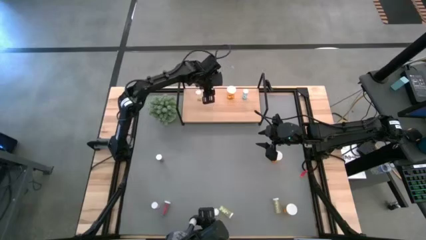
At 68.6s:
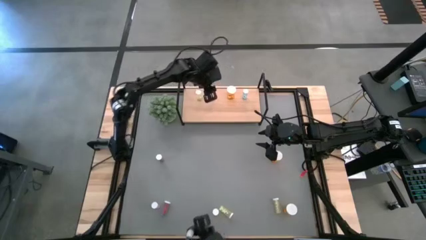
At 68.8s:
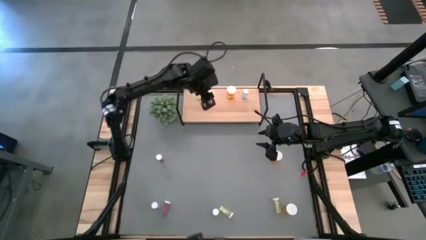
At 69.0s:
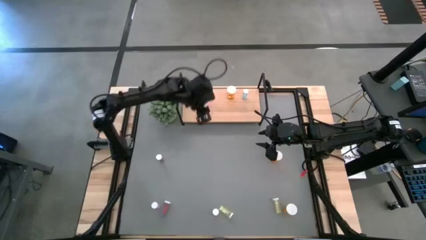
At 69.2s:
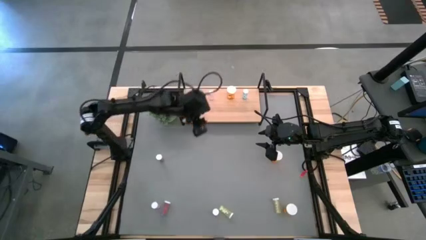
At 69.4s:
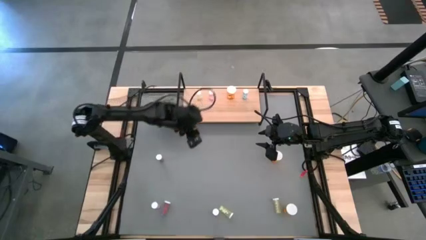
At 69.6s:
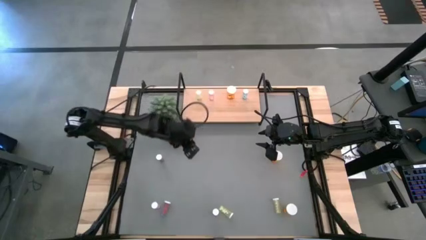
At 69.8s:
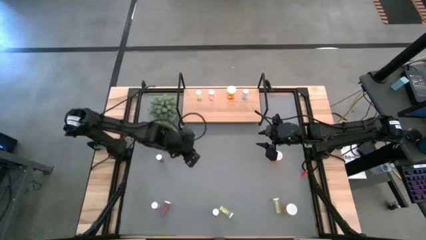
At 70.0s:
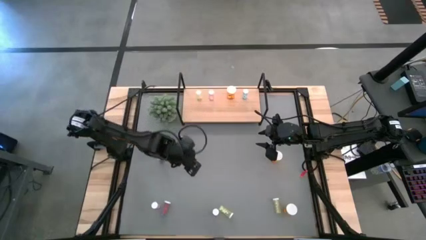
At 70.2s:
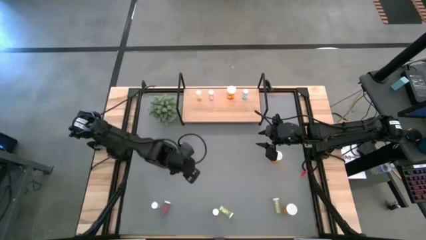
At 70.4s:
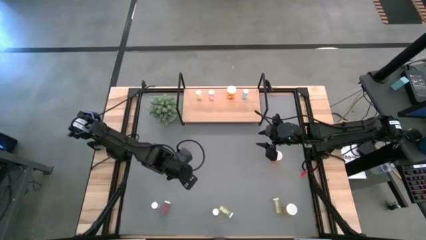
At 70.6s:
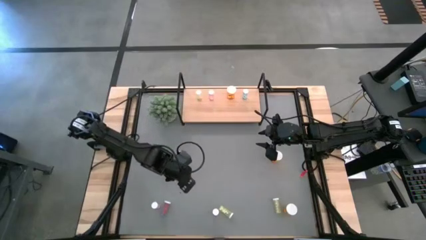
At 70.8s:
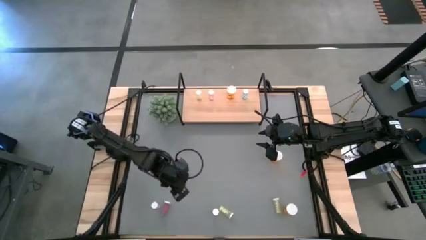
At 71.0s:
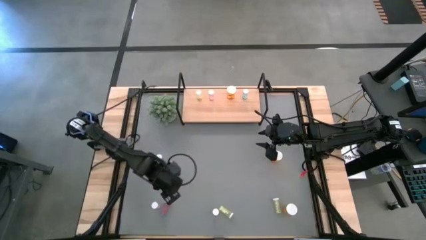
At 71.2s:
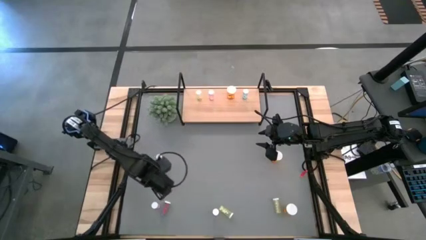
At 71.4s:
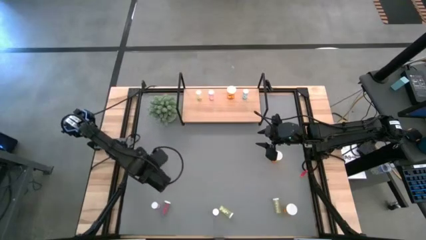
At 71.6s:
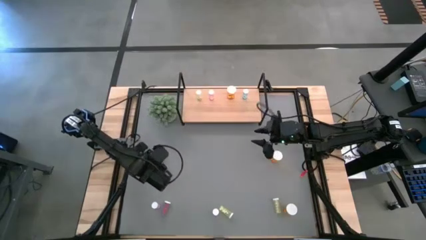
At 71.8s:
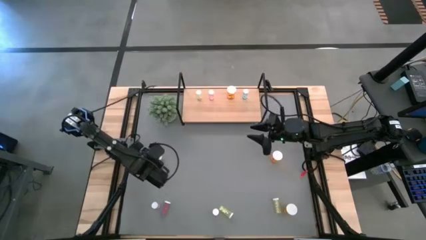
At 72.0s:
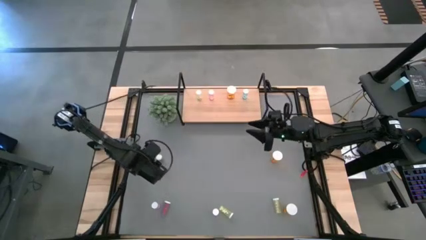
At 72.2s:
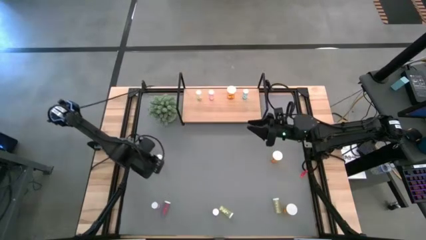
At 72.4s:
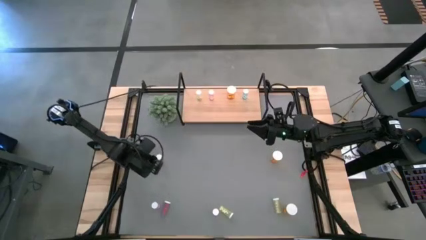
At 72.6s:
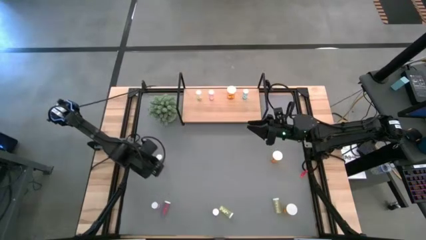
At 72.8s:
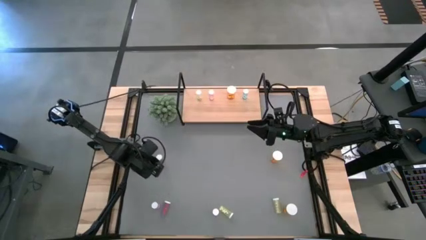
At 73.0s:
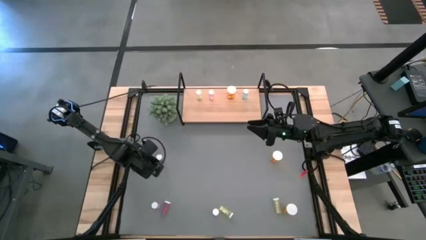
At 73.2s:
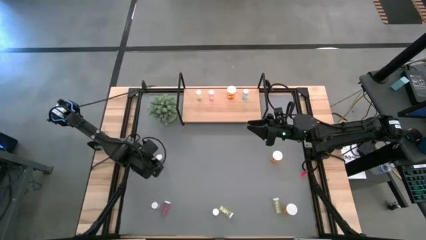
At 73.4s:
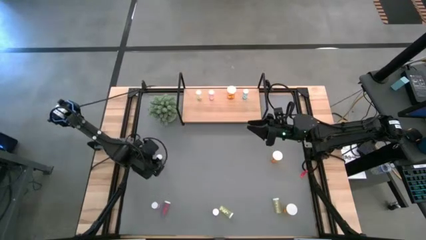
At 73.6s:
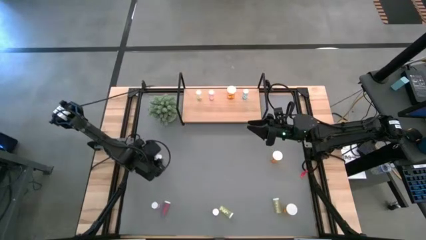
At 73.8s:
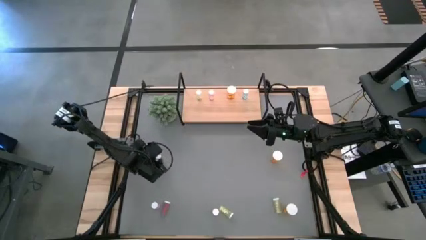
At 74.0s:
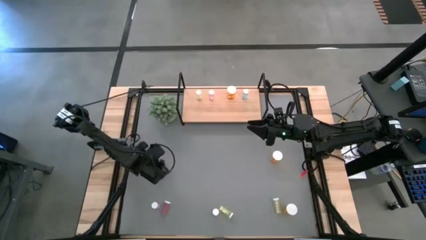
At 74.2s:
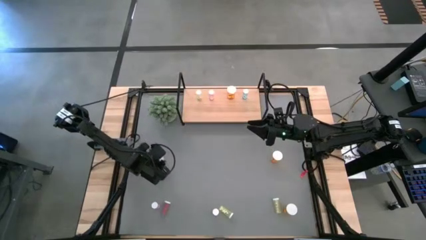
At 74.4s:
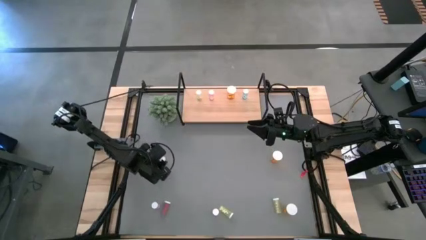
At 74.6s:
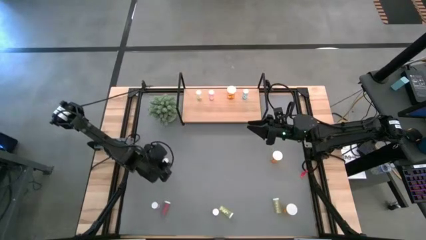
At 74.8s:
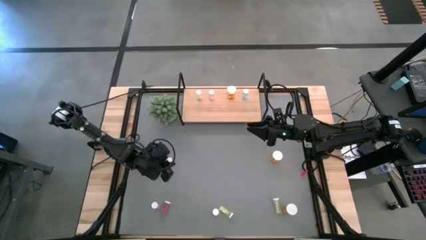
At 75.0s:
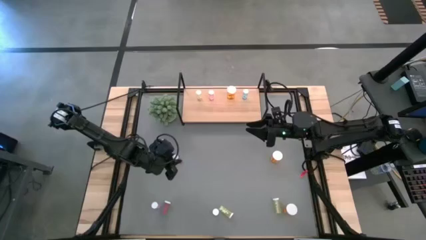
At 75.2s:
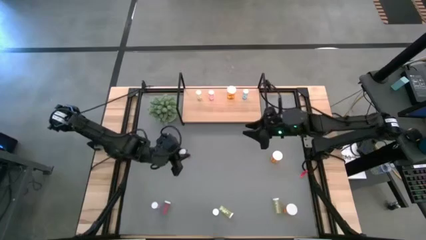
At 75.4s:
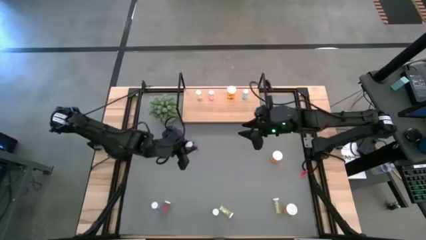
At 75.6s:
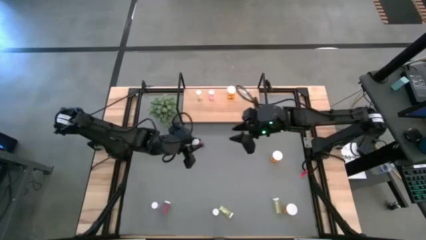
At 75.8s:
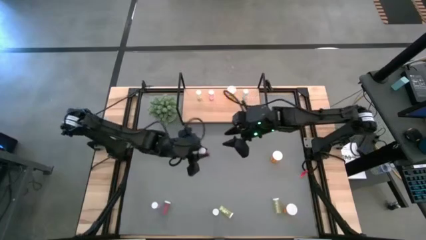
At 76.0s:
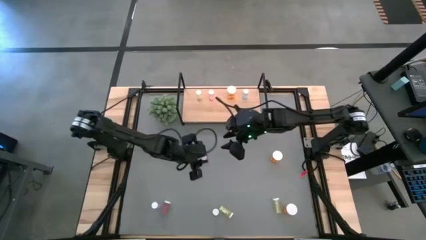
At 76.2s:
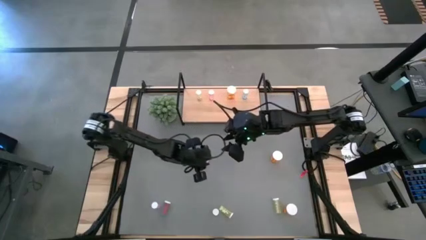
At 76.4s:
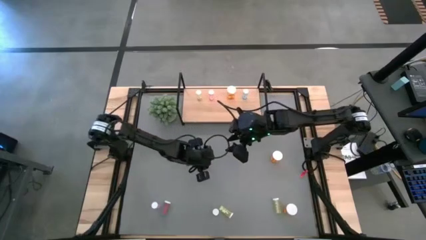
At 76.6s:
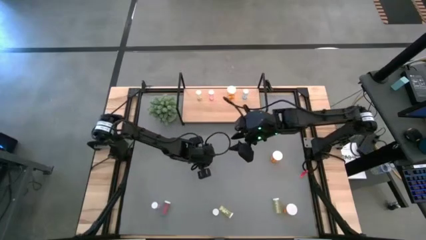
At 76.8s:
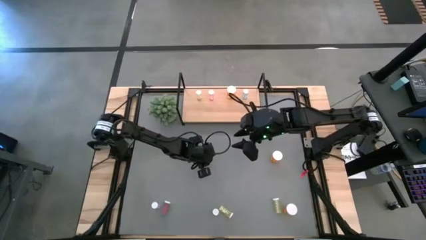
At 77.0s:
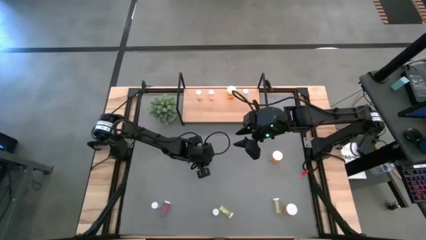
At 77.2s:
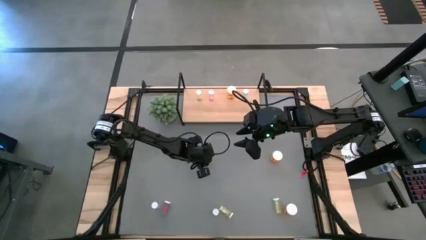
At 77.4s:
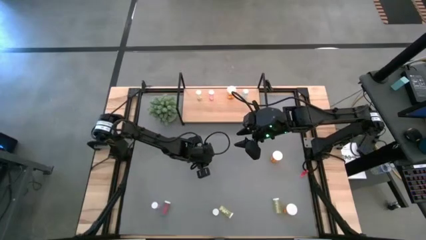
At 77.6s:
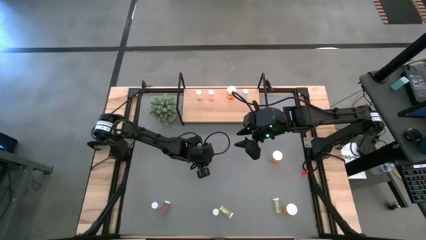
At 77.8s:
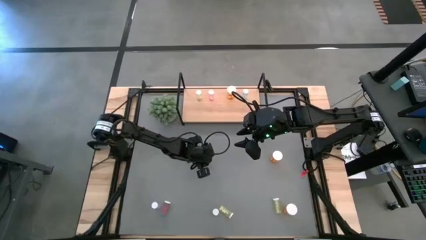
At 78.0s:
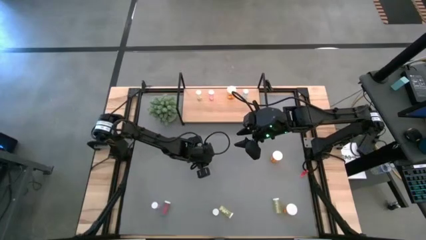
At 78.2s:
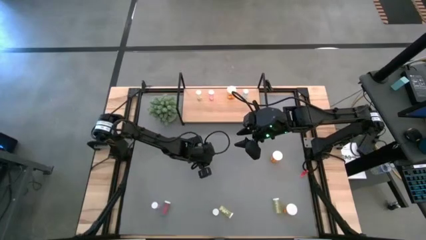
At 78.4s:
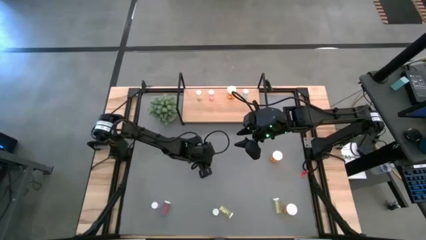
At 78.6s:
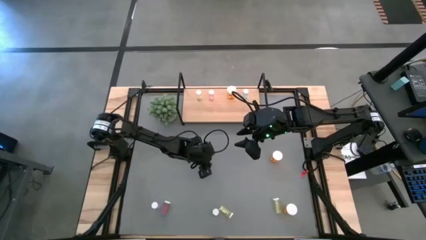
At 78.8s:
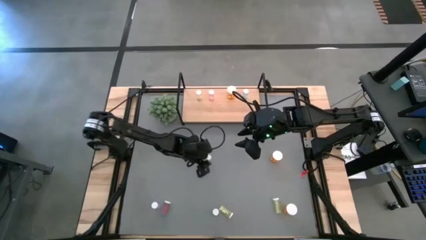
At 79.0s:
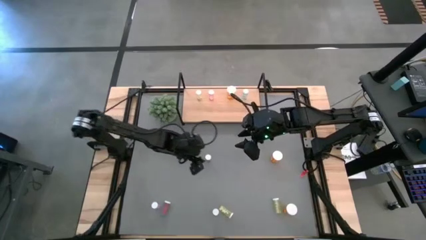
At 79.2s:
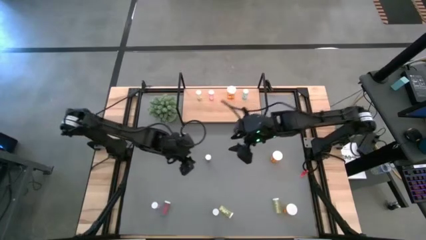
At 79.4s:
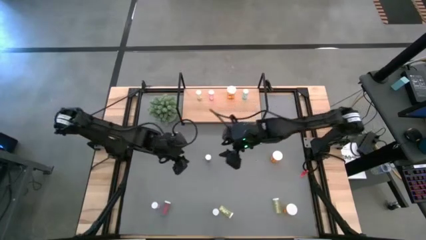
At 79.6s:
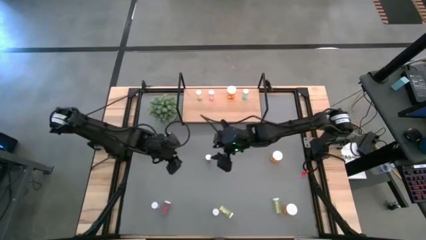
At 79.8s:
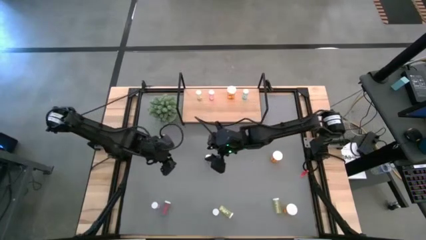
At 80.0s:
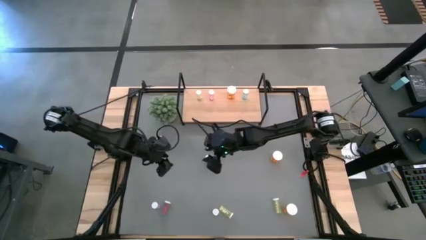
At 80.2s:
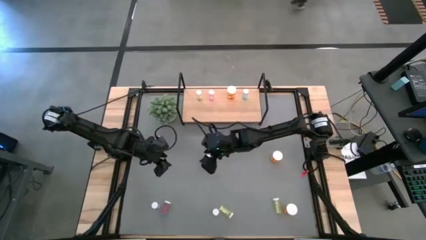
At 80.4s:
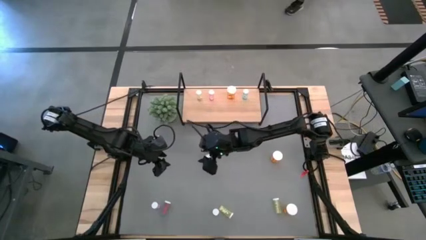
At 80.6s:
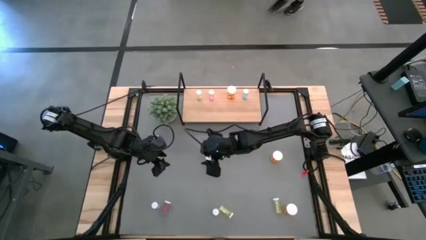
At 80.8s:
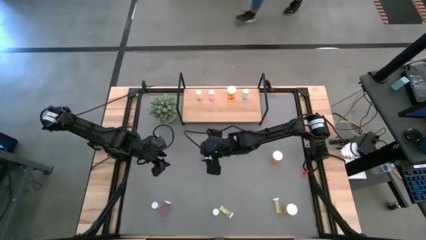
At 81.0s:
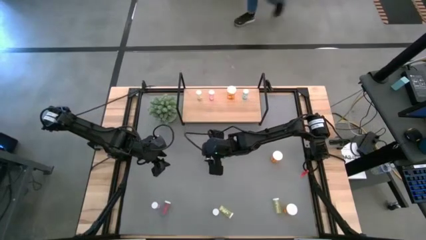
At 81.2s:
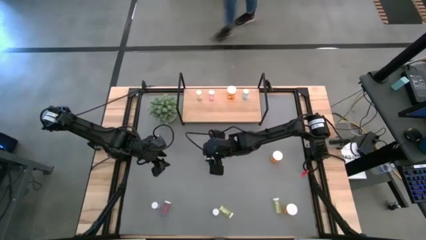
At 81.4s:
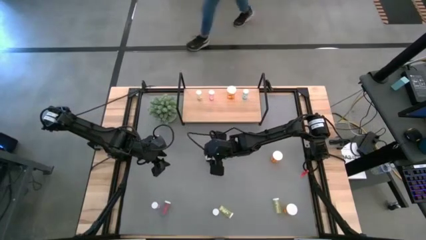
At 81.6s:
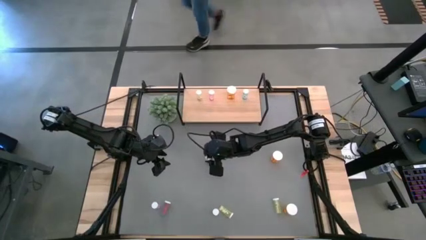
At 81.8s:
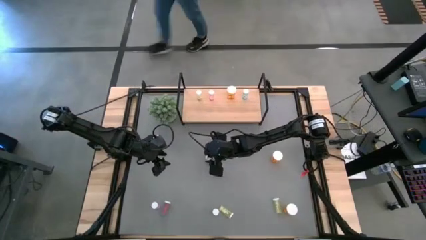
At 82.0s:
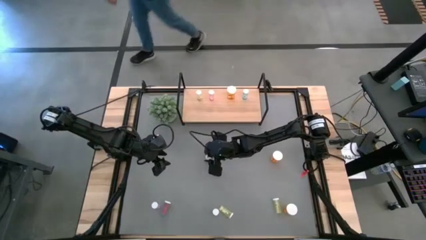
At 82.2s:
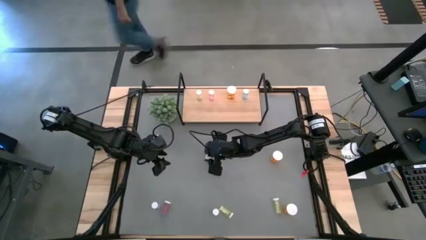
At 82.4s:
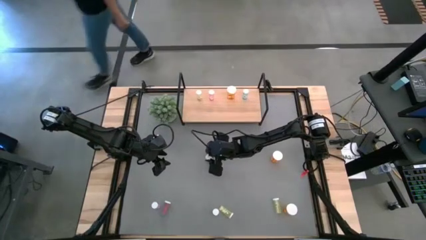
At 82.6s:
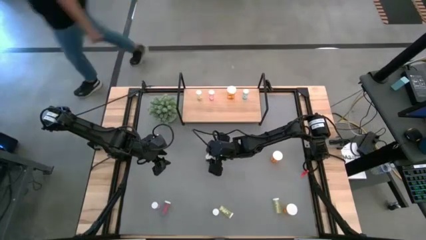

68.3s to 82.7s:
Task: Pick and place medicine bottles onto shelf by color
Put the top blue pill bottle on the shelf aligned with the other blue pill bottle

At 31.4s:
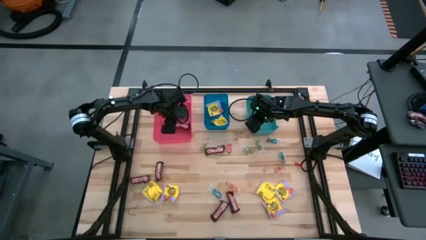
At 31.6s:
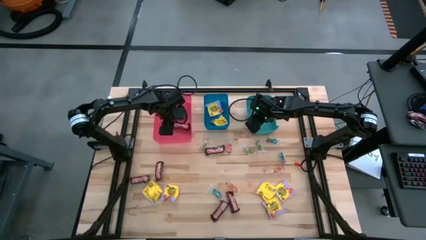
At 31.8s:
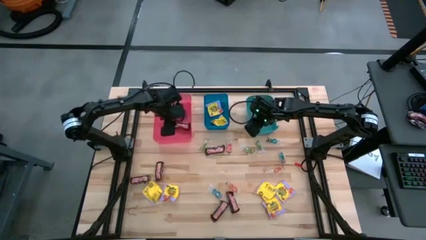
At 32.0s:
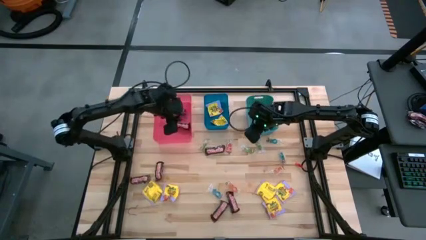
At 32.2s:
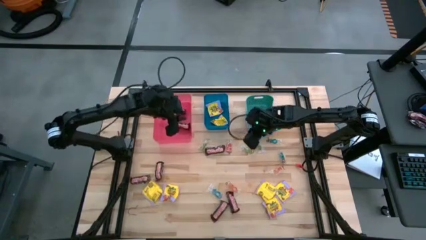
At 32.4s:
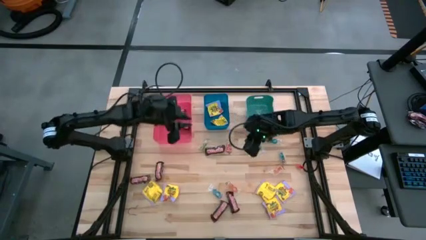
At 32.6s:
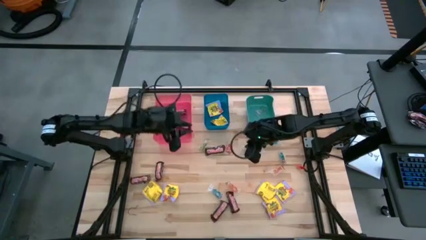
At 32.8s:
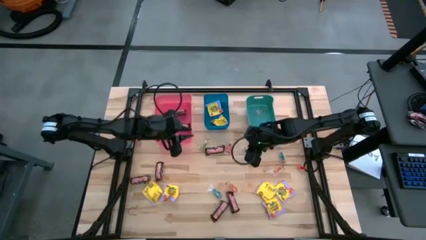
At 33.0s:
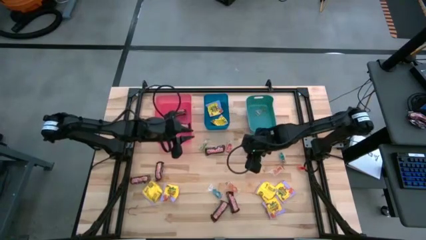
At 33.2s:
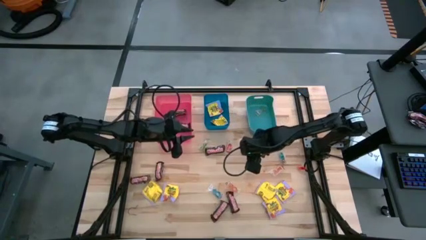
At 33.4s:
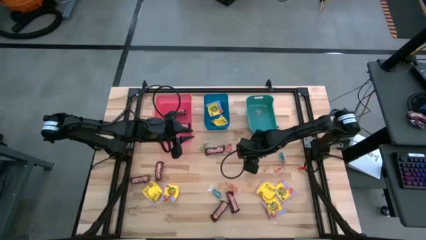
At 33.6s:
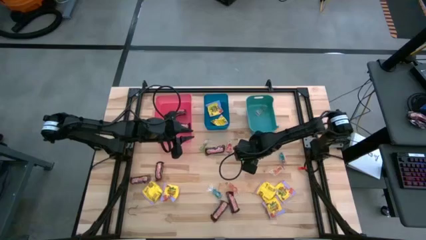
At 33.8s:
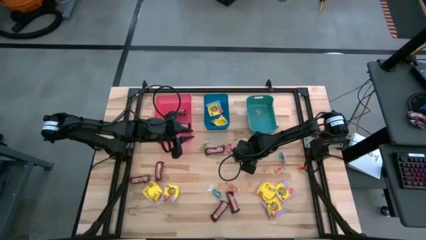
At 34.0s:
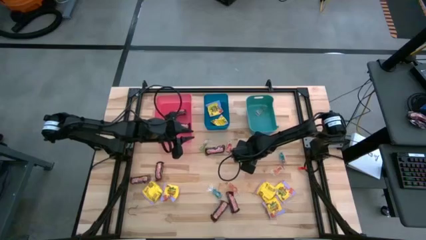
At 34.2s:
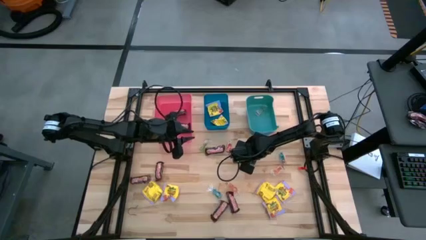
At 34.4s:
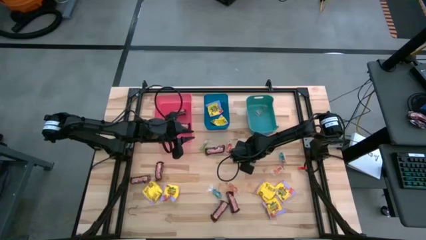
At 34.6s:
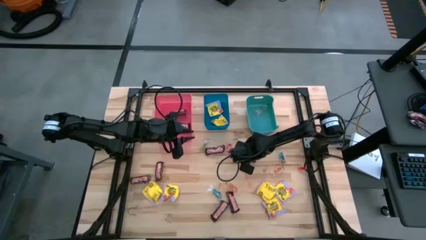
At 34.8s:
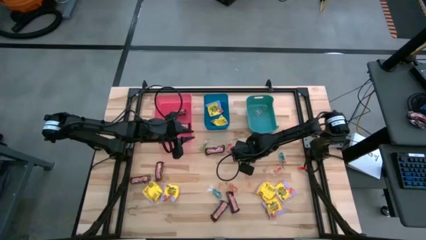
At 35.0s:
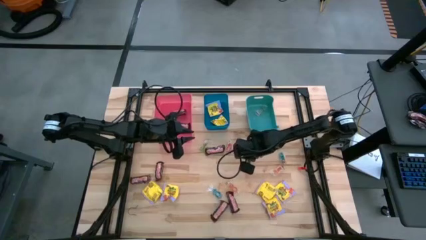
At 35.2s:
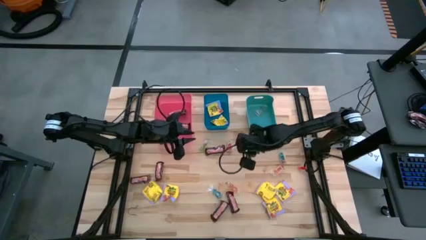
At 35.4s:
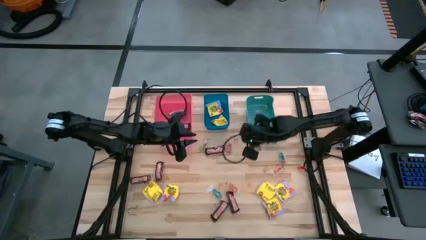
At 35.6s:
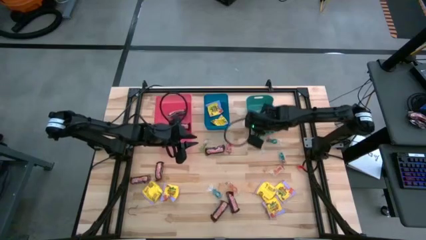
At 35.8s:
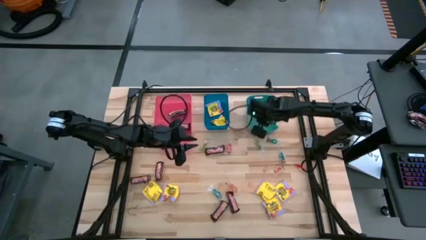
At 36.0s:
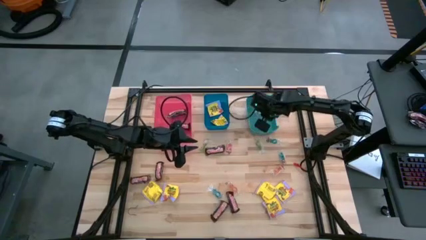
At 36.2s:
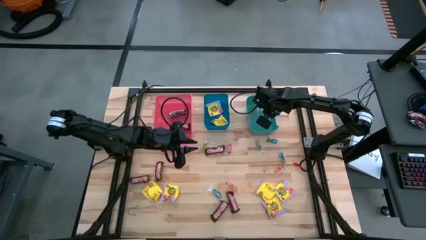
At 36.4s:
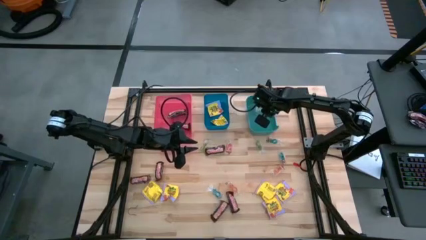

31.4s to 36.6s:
Task: Sort candy
Put the green gummy candy into the green bin
